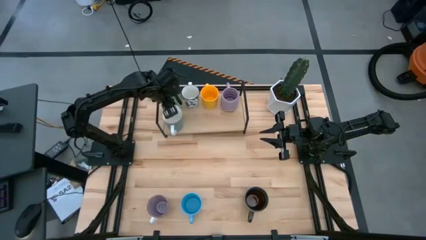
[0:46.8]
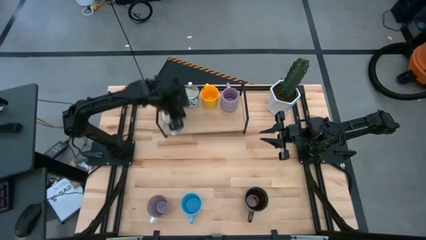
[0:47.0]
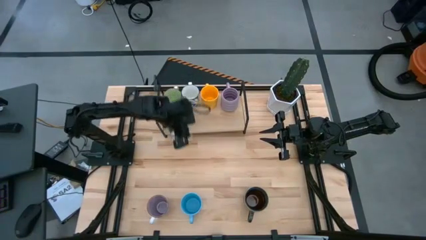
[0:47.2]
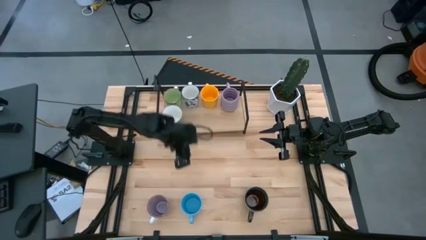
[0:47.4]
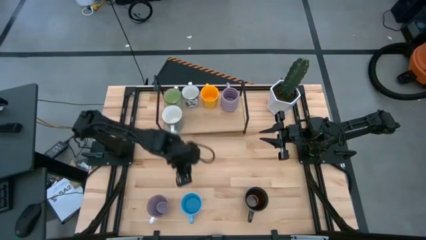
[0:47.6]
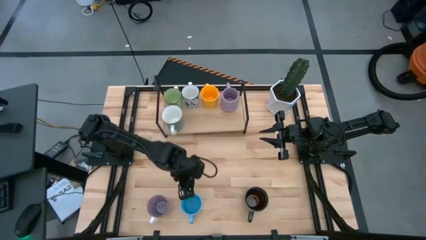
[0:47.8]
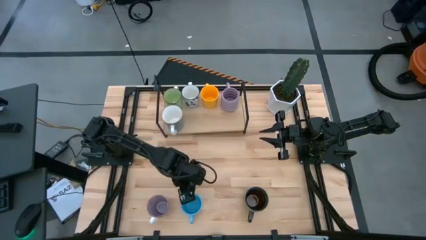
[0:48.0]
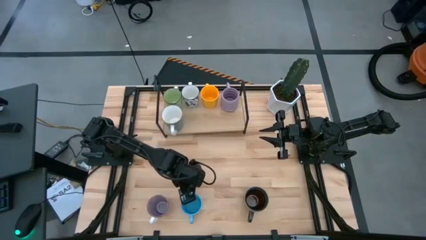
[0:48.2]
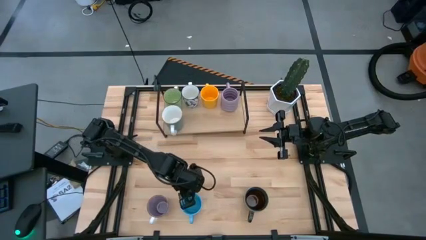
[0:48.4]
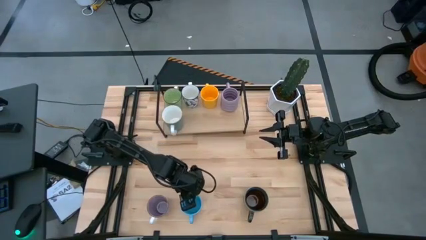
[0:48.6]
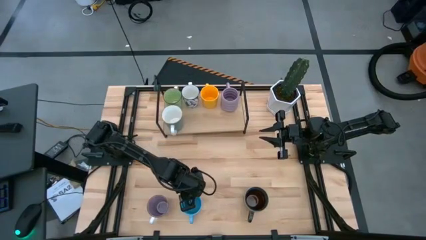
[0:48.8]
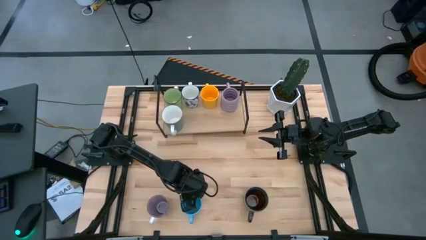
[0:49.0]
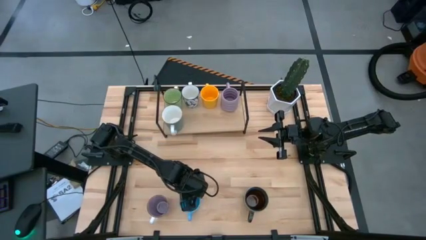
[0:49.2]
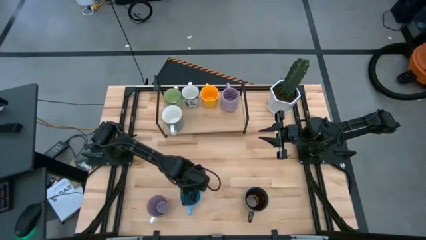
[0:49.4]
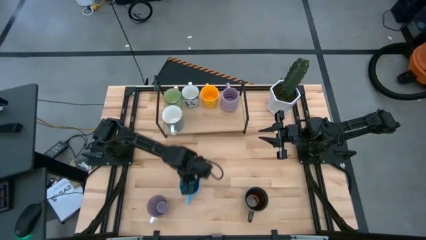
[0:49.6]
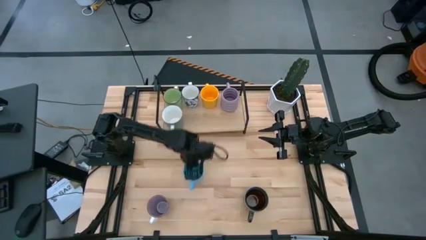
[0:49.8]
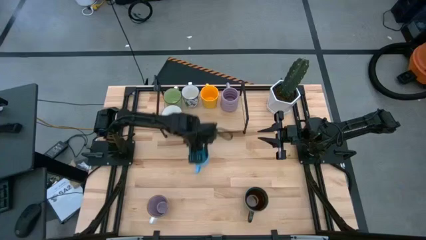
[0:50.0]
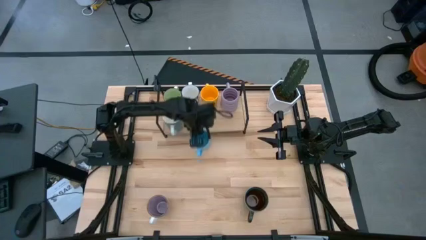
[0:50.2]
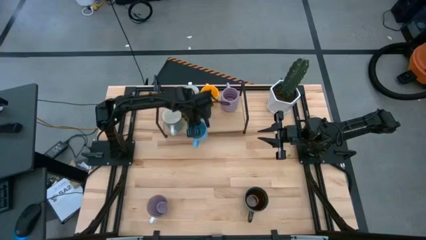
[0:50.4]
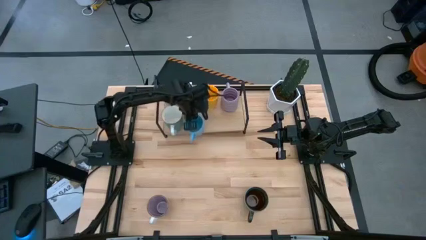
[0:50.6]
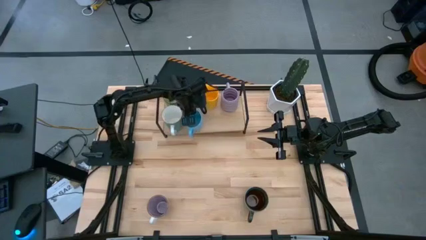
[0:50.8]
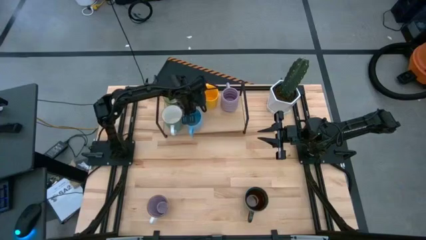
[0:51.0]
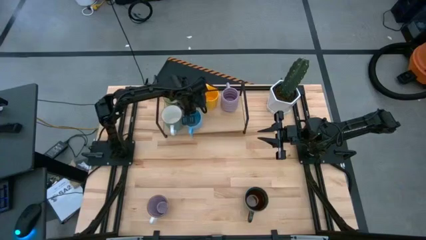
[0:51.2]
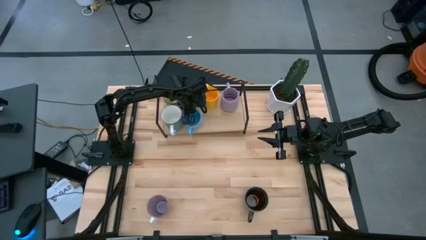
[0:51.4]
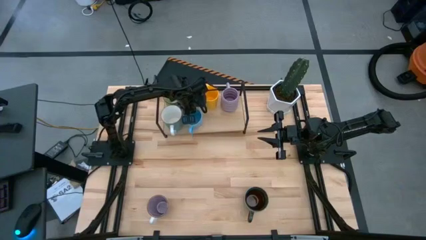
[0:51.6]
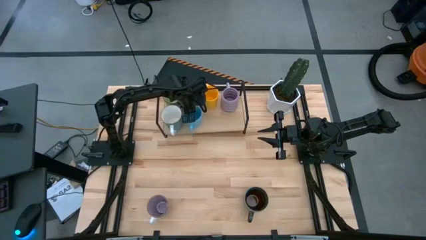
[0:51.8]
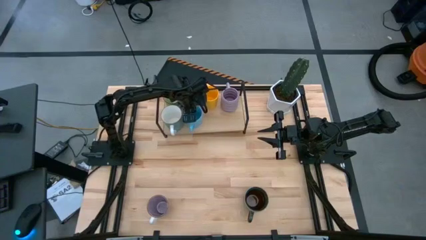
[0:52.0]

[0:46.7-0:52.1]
Task: Place coffee mugs
Put the blue mug on the shelf

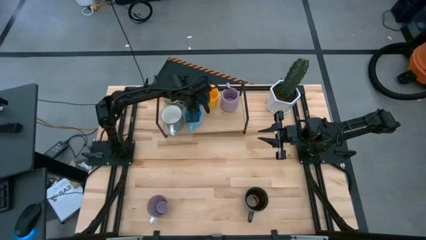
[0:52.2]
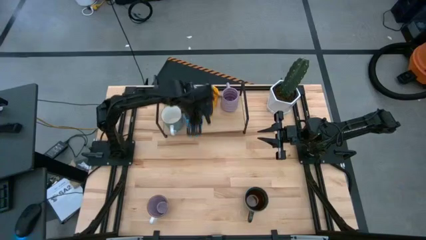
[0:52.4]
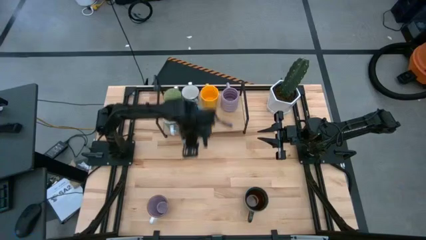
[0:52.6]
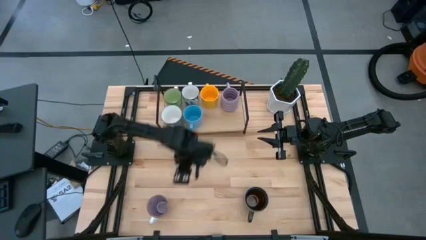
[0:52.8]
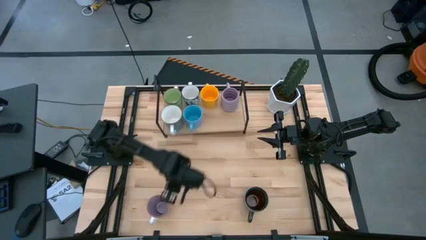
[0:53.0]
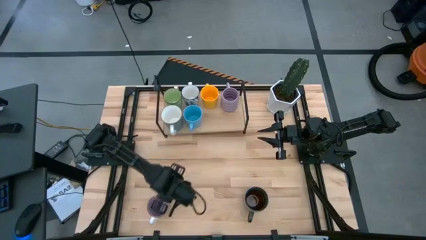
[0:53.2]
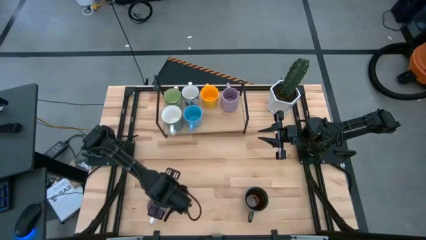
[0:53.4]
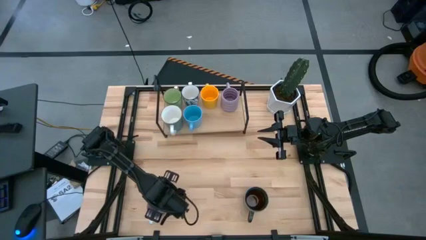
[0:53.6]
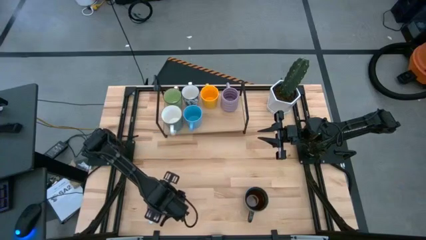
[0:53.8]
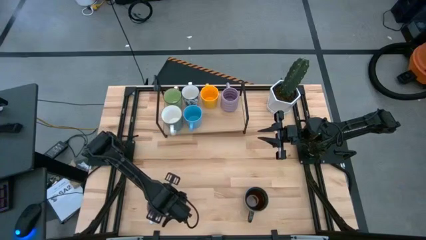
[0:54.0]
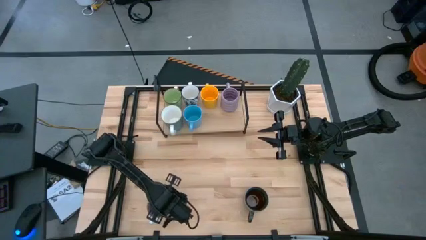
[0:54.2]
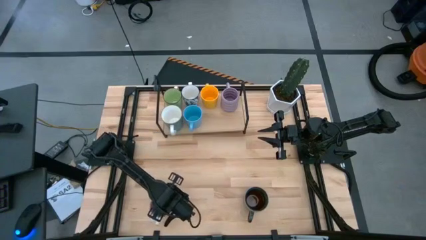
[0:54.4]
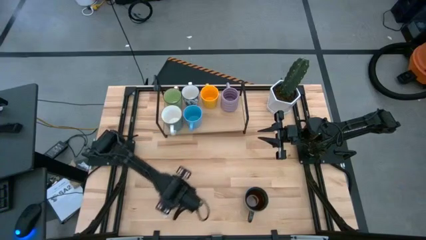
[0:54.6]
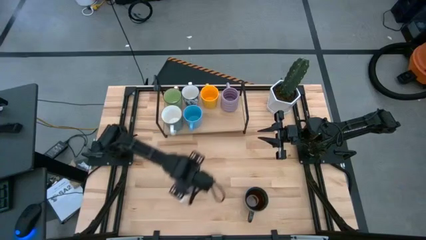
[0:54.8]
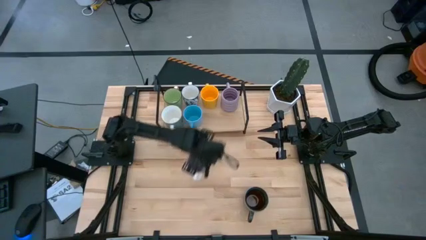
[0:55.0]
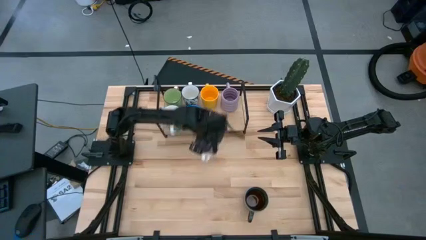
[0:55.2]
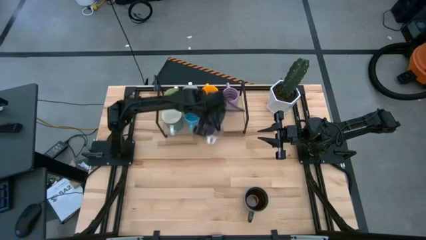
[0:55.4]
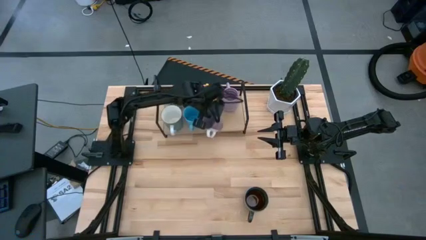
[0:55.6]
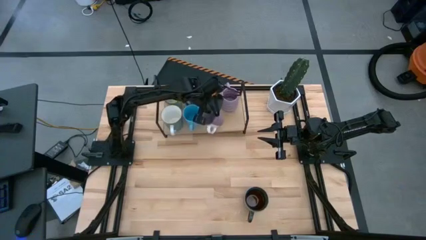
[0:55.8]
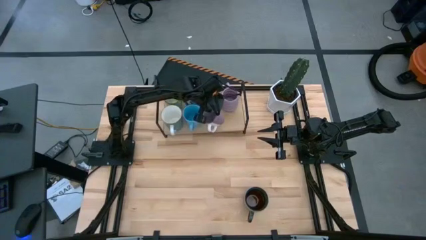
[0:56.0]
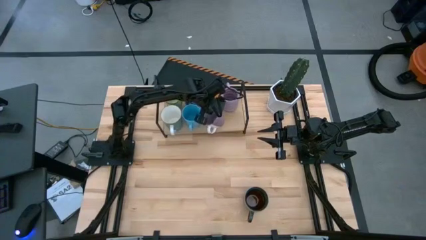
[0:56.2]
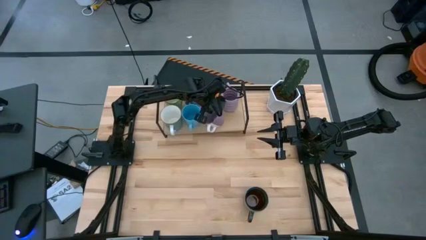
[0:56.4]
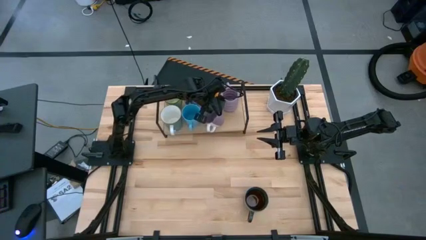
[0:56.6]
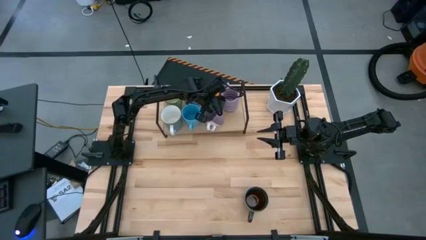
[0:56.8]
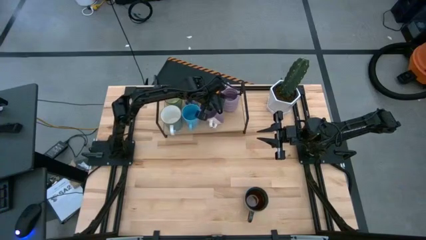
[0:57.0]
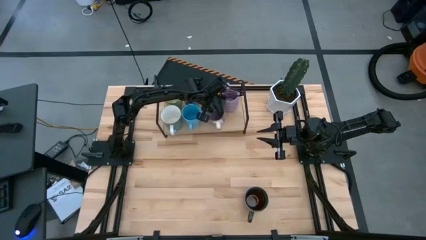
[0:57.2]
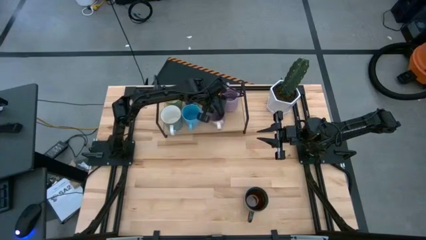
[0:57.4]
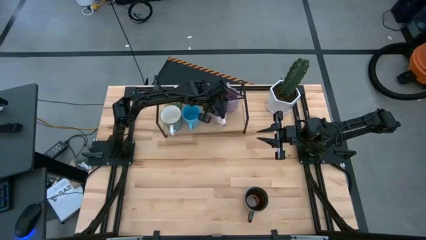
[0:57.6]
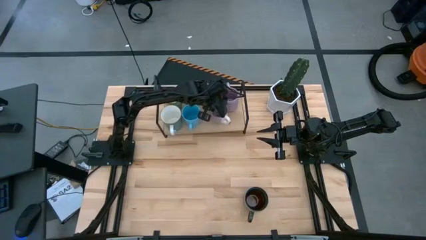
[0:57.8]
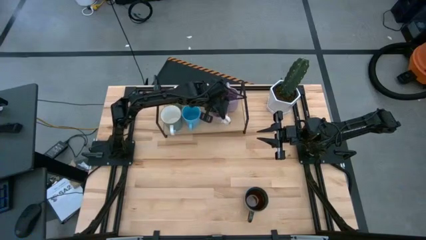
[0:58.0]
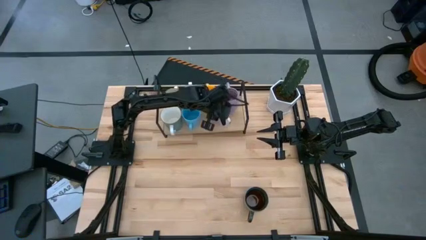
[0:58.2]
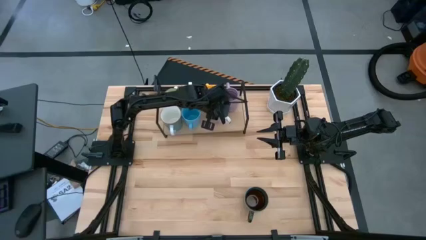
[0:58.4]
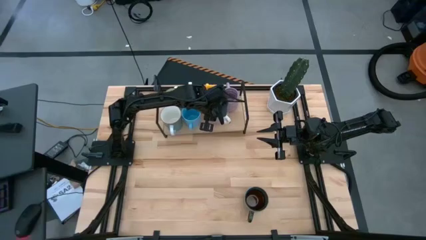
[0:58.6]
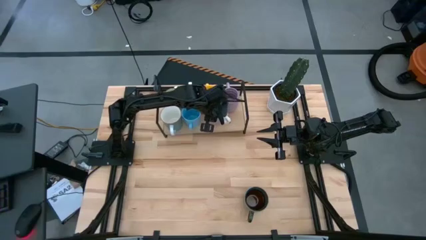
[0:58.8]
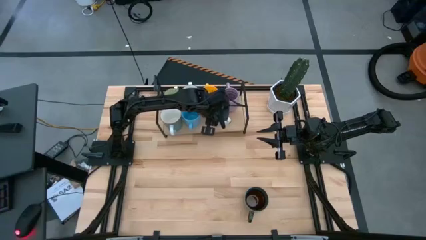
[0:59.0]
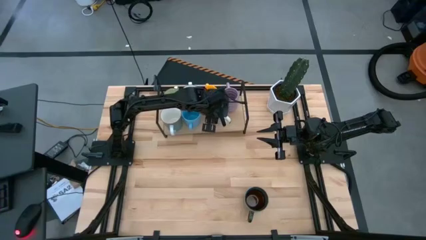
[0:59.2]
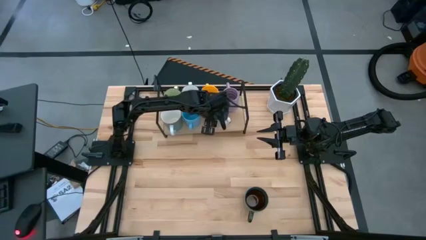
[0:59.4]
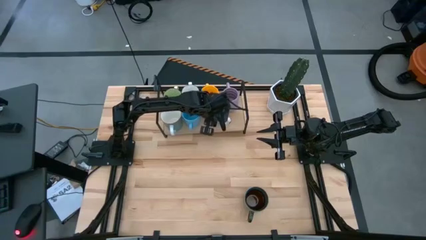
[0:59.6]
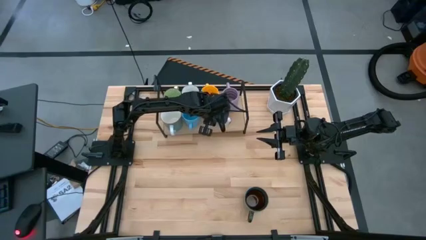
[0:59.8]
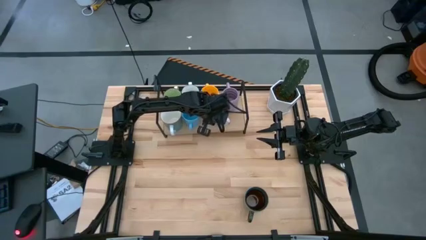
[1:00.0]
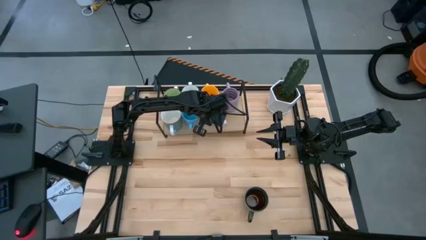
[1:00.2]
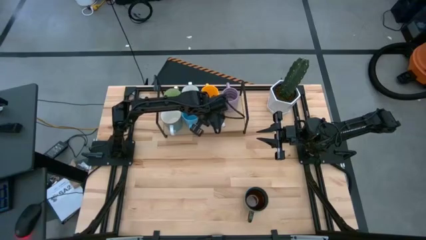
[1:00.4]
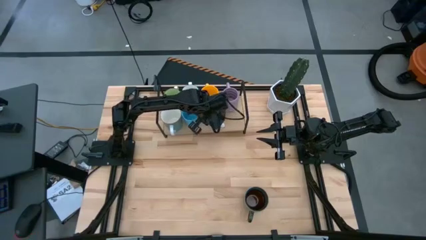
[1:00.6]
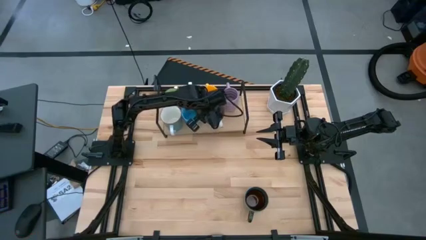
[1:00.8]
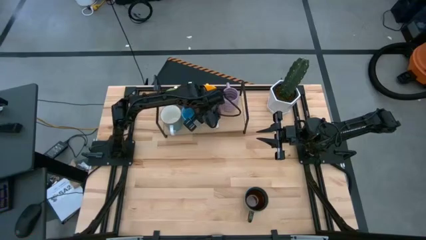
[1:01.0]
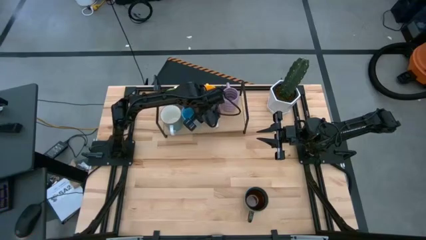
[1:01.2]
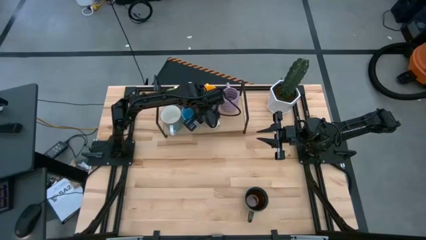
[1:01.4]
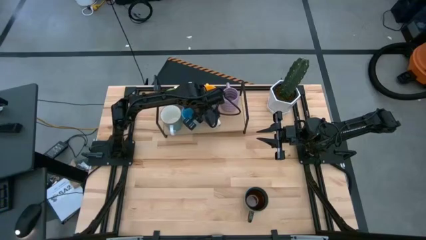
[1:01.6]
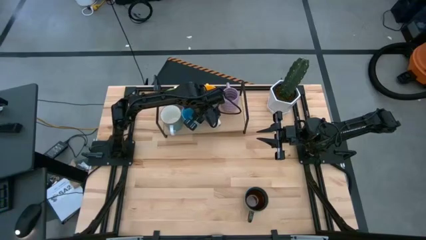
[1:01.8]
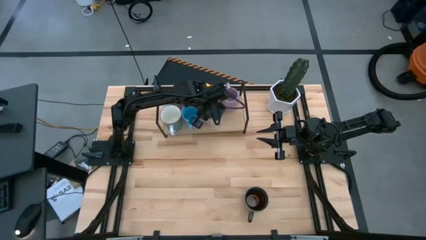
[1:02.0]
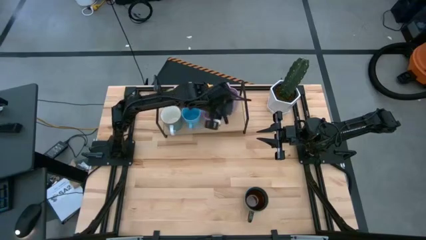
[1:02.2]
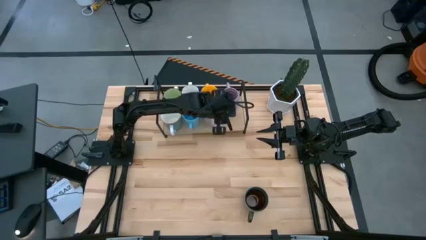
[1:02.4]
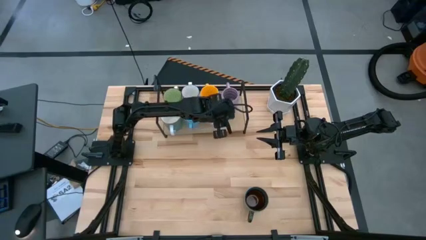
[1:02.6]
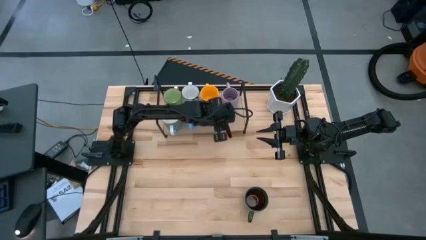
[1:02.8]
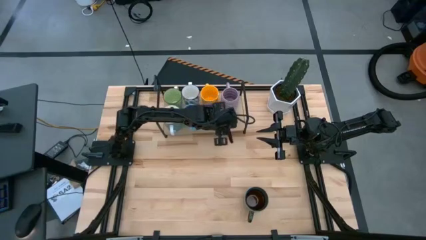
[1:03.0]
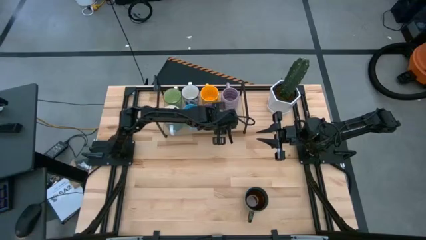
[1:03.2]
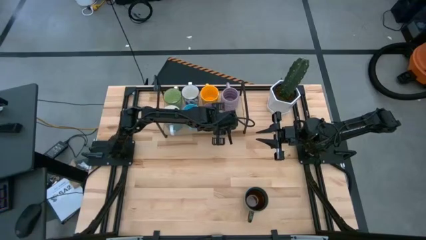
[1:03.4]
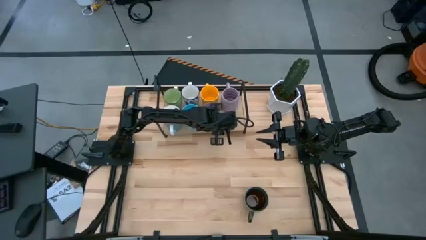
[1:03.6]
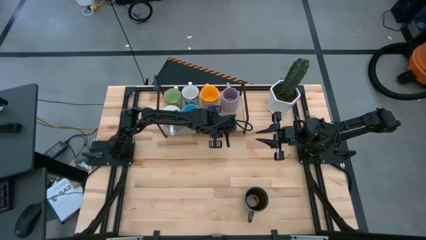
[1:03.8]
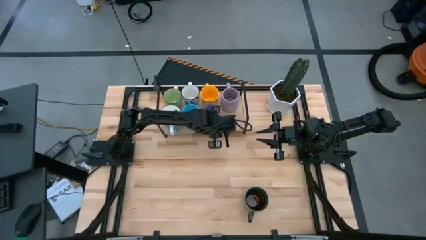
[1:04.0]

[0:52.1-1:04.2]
Put the purple white mug on the shelf
